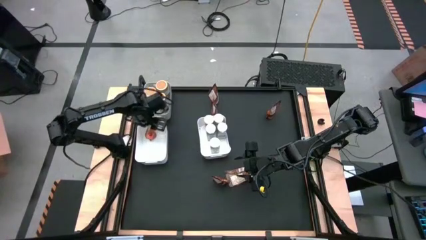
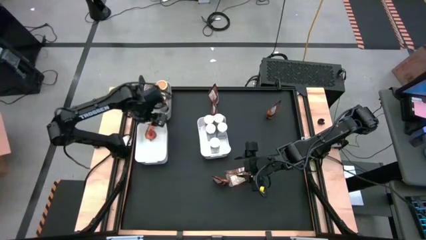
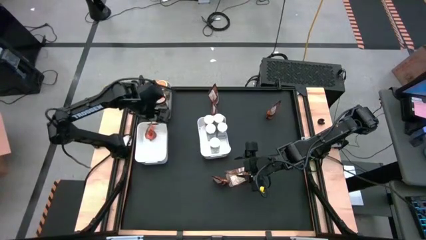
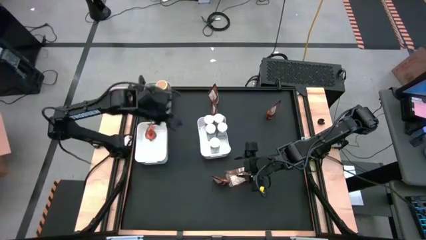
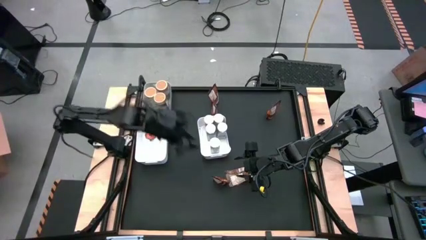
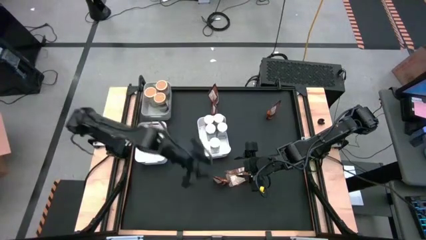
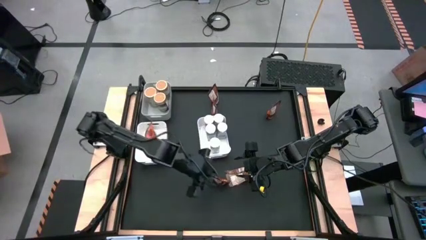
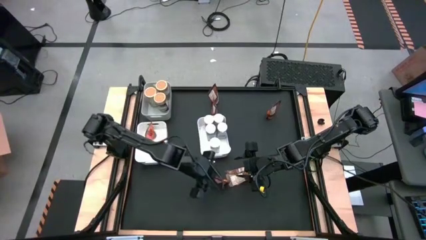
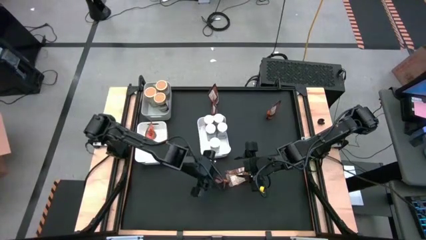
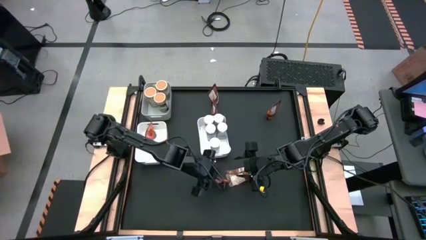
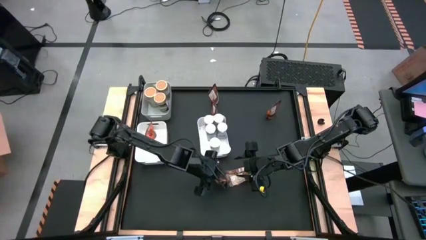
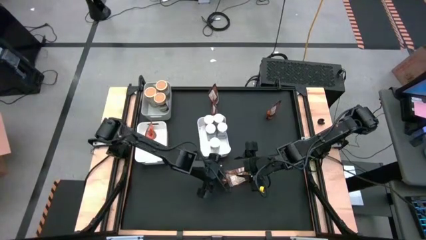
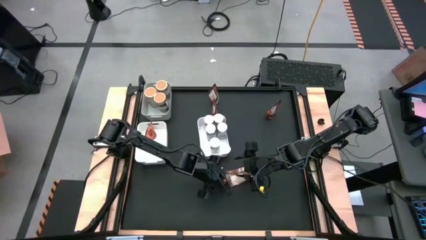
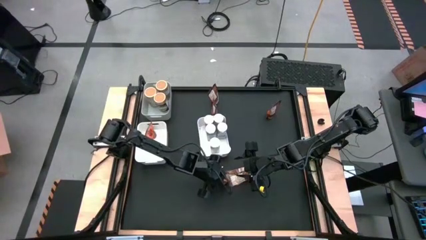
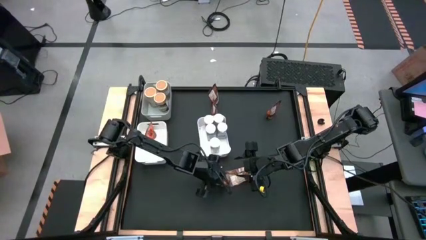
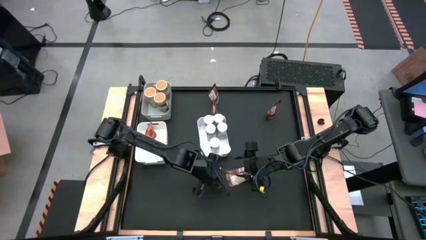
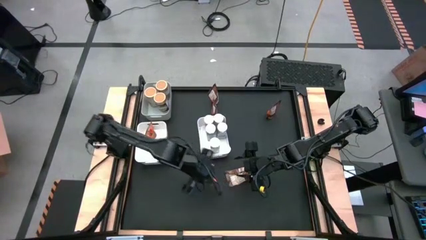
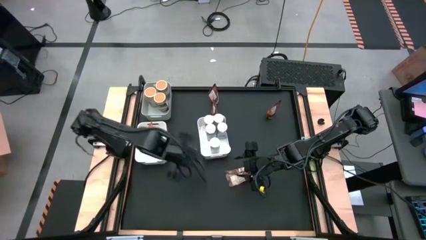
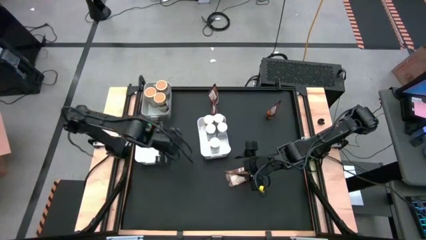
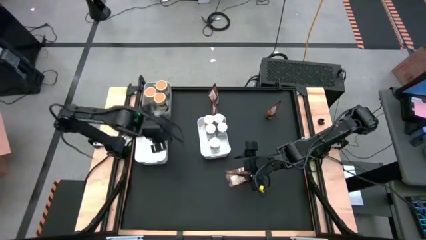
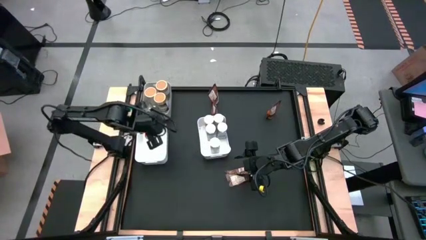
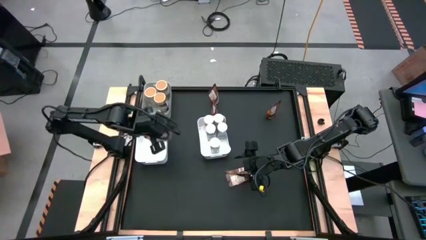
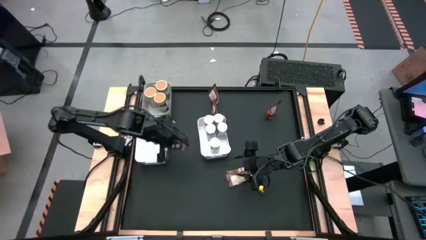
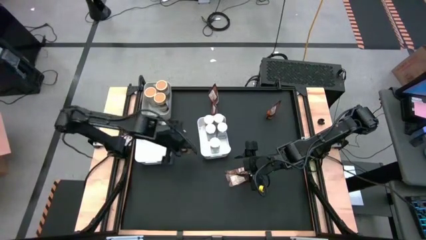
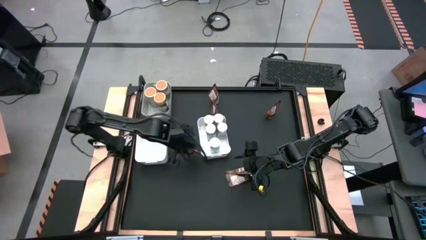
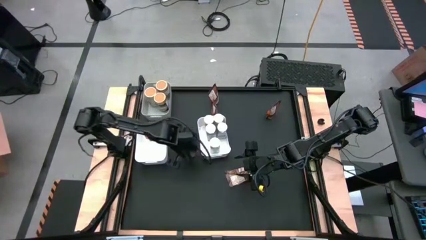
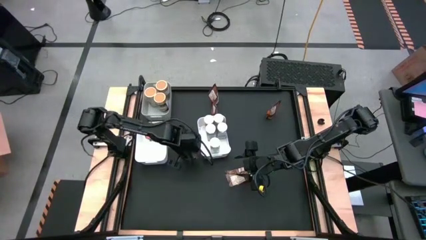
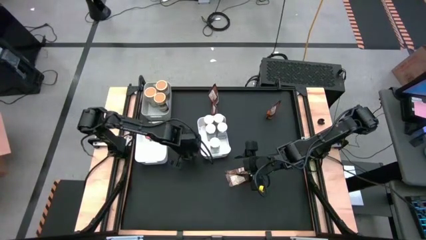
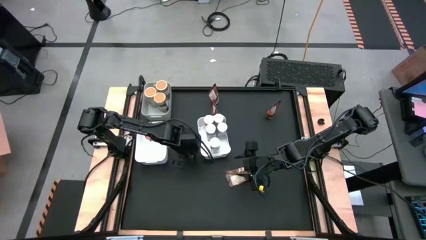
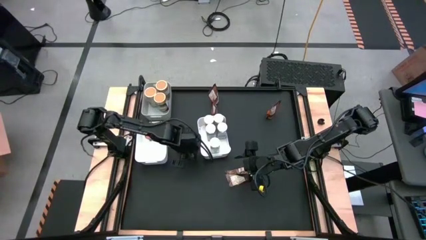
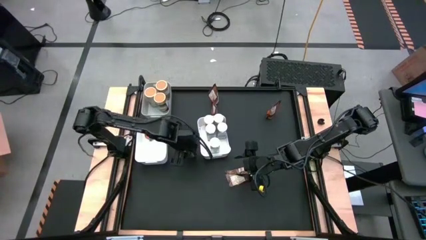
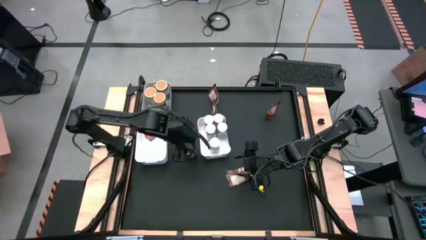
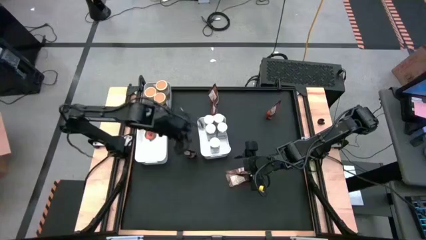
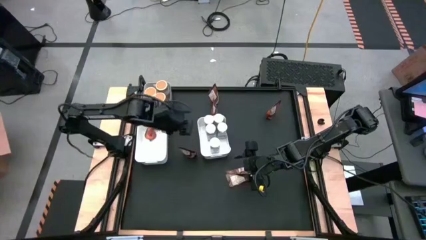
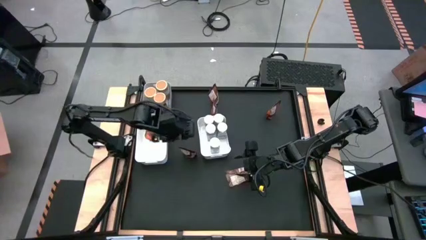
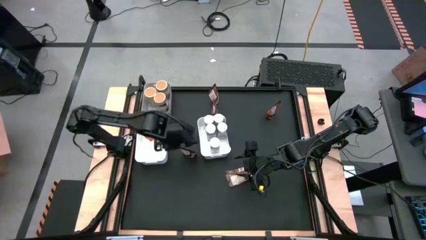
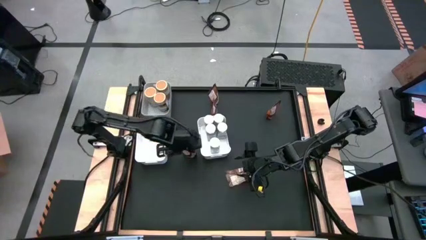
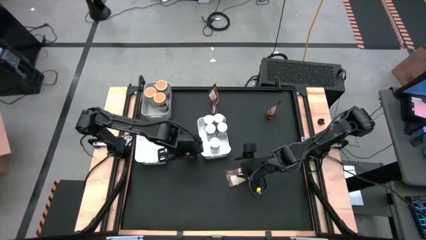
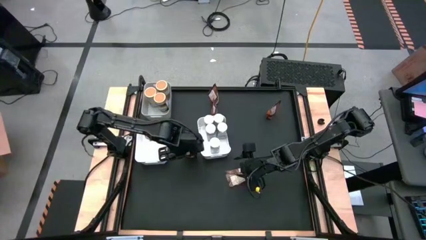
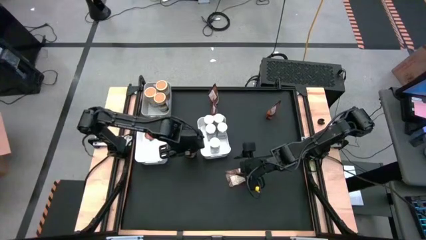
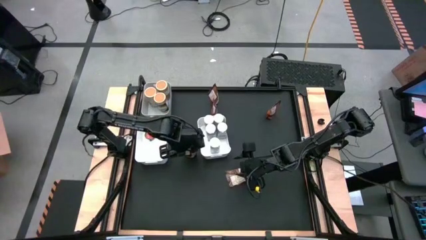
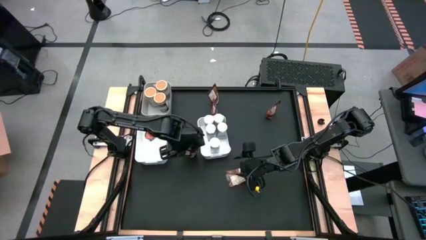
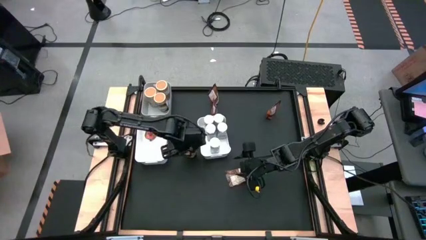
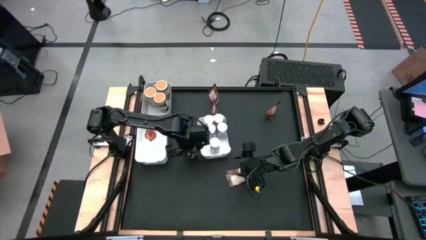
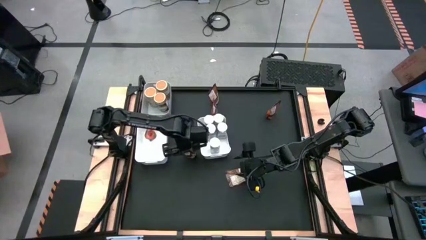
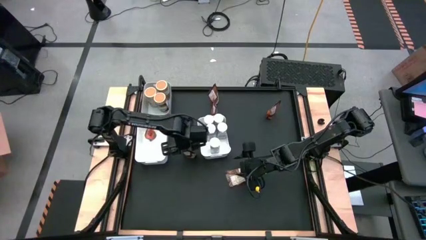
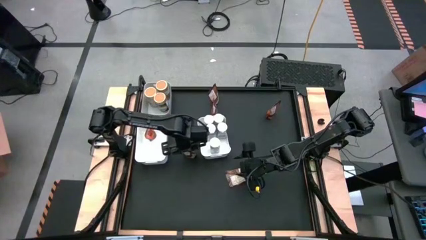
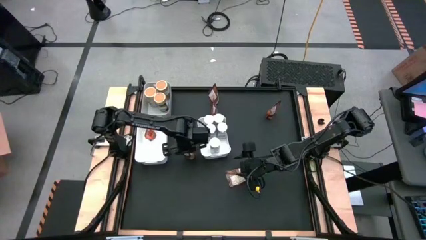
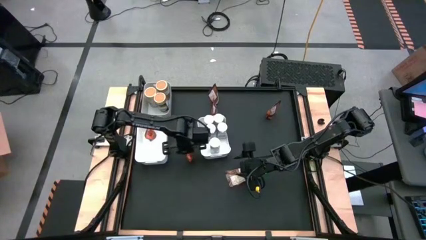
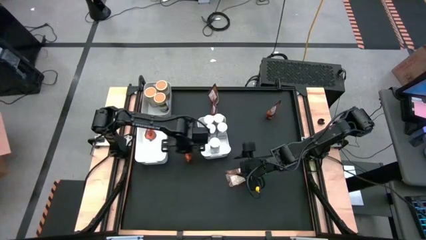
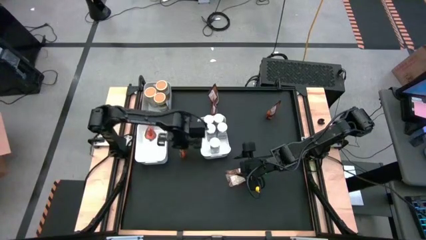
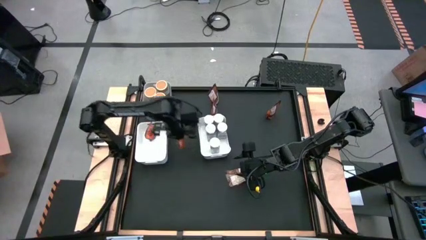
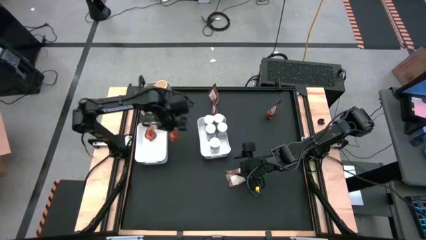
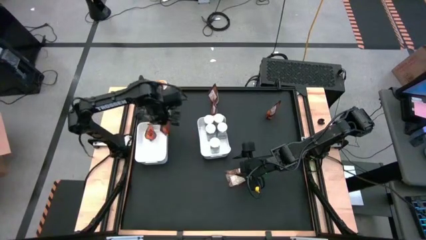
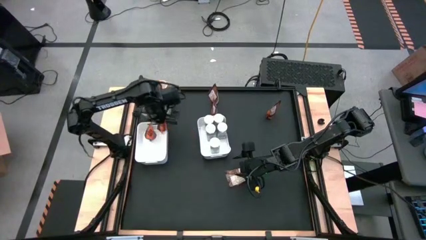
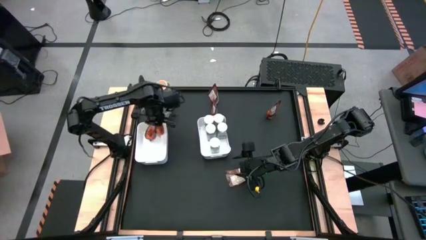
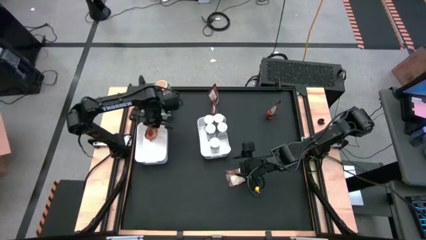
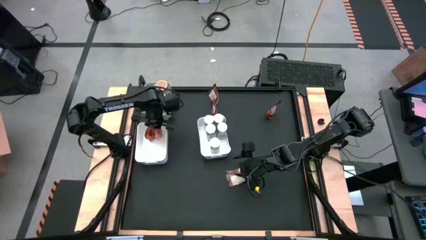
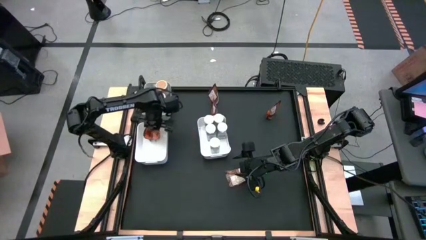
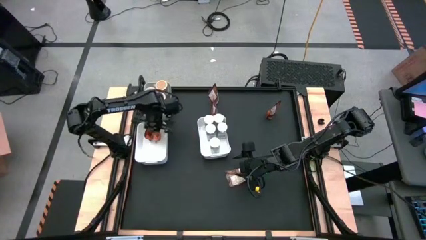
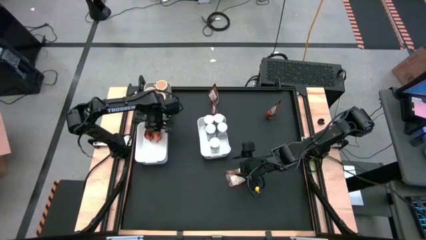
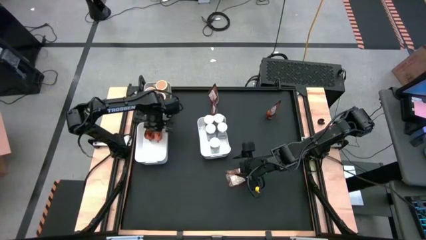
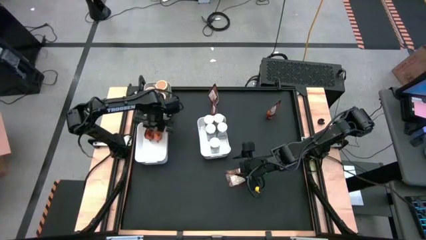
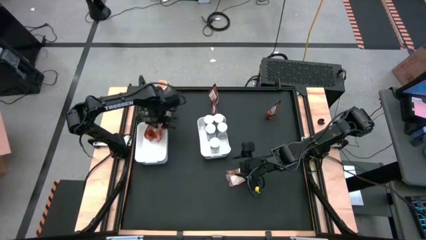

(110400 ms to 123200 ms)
Task: Sort spices by type
Put the orange seasoning pack into the left white bin
